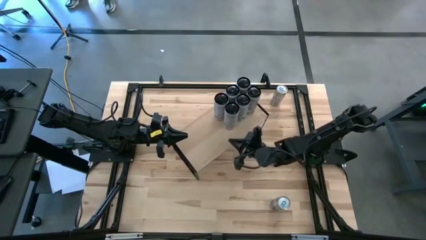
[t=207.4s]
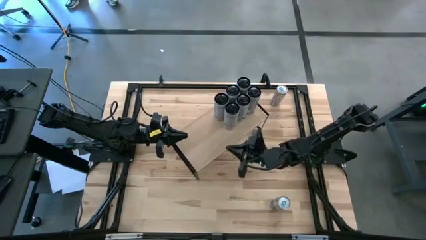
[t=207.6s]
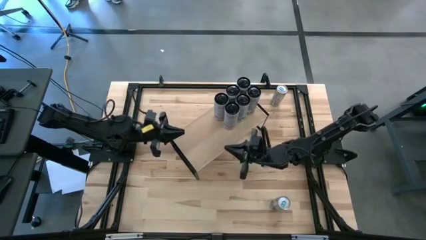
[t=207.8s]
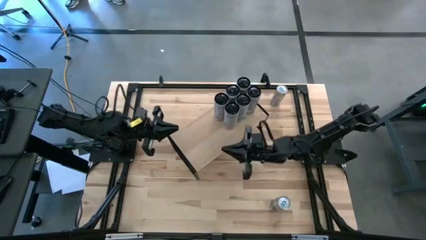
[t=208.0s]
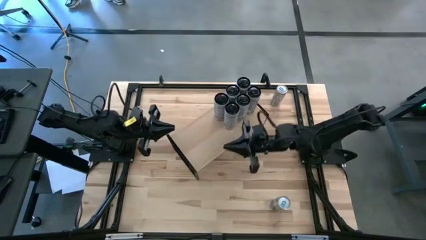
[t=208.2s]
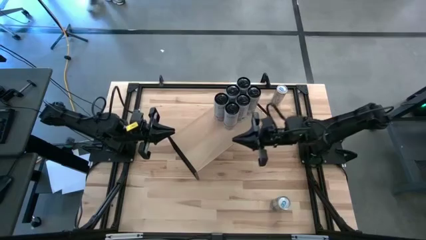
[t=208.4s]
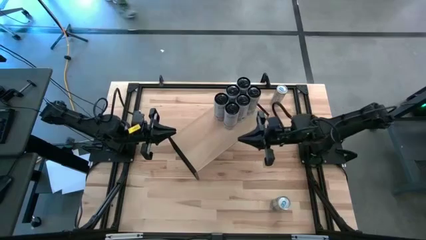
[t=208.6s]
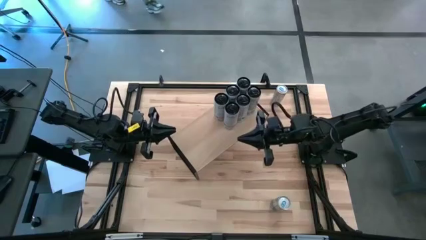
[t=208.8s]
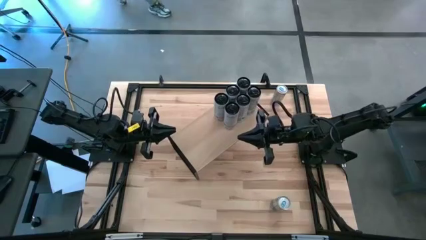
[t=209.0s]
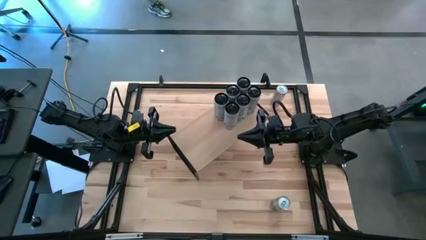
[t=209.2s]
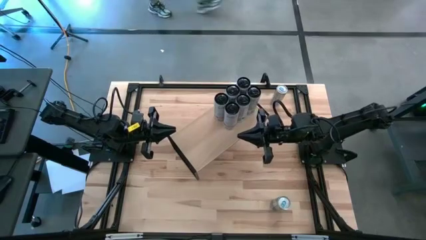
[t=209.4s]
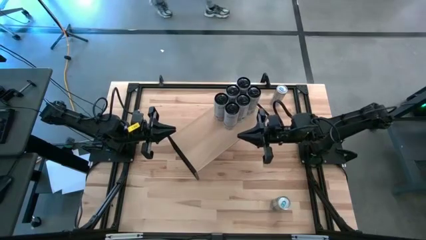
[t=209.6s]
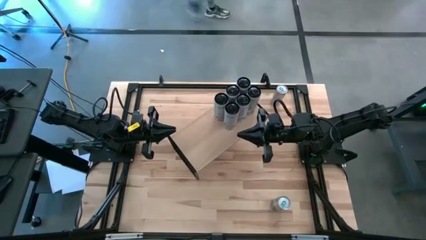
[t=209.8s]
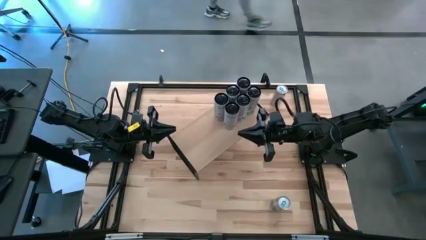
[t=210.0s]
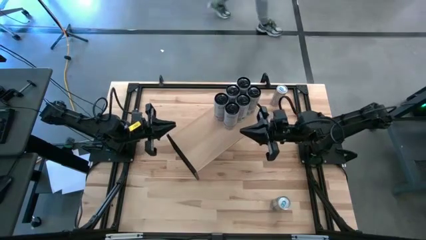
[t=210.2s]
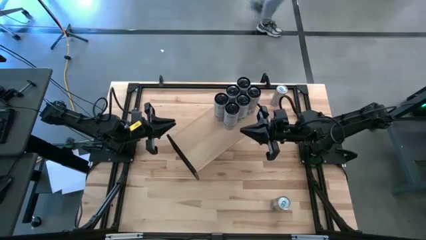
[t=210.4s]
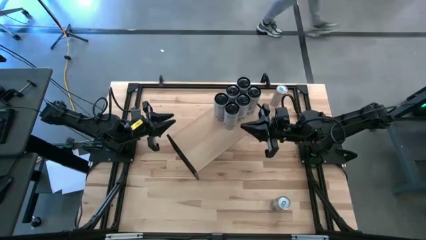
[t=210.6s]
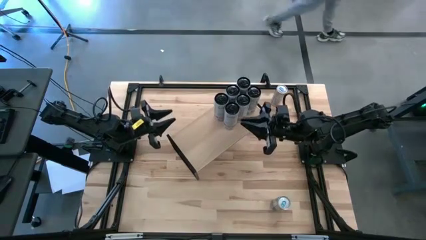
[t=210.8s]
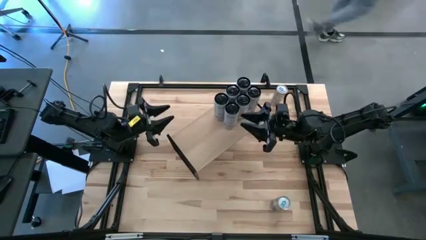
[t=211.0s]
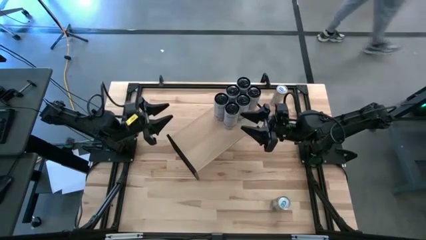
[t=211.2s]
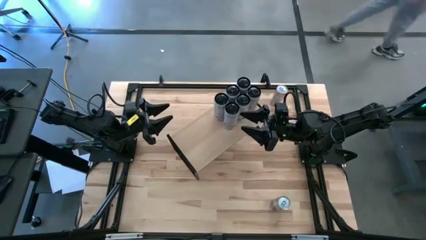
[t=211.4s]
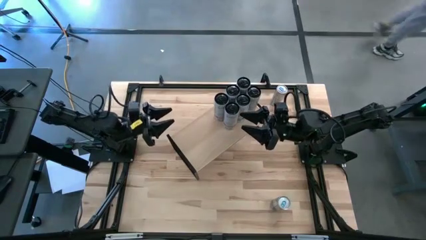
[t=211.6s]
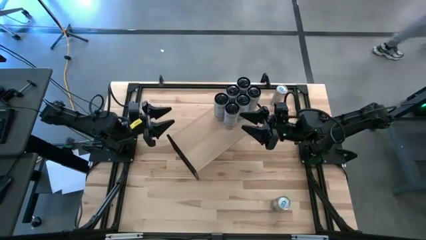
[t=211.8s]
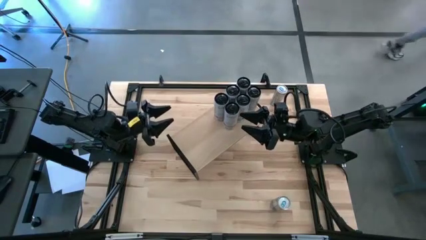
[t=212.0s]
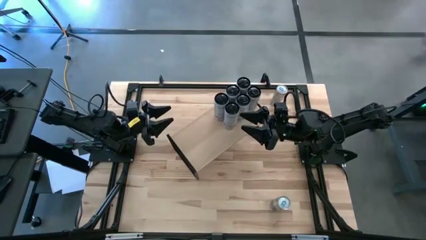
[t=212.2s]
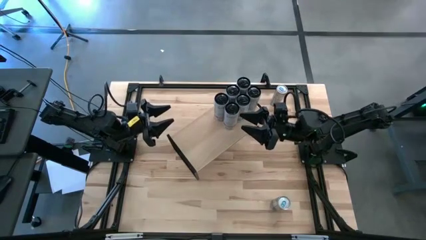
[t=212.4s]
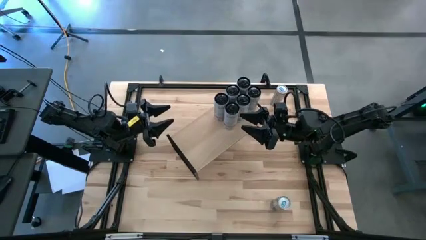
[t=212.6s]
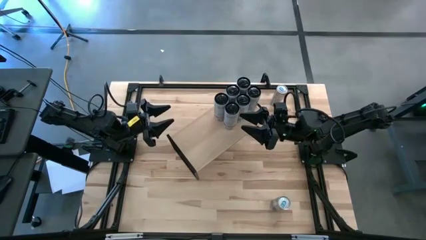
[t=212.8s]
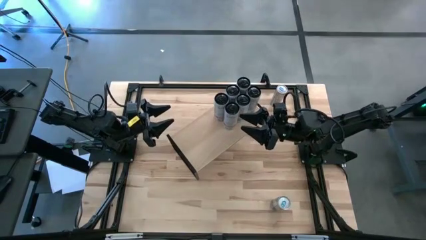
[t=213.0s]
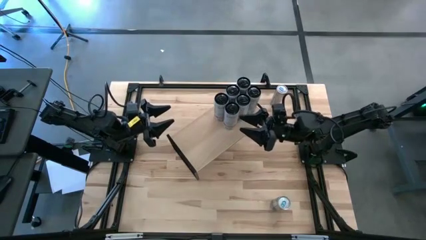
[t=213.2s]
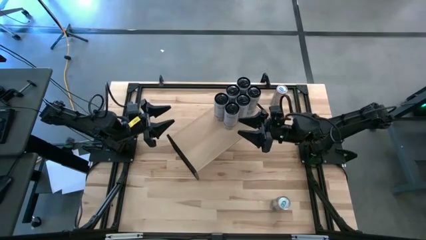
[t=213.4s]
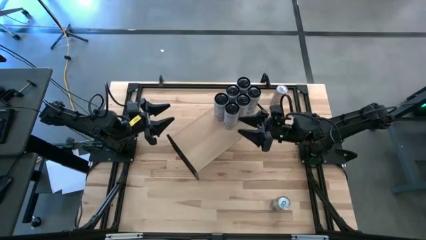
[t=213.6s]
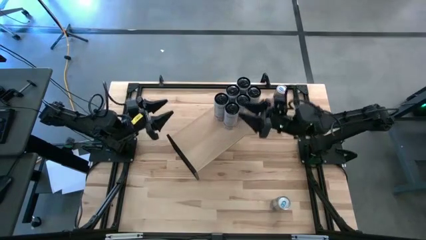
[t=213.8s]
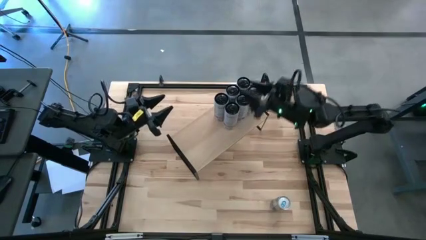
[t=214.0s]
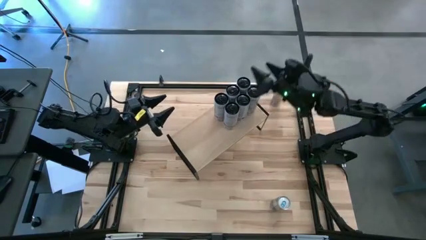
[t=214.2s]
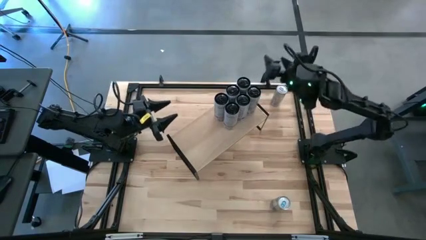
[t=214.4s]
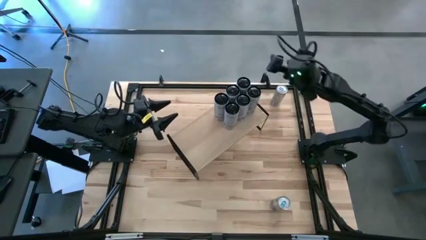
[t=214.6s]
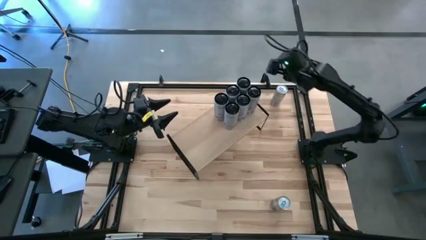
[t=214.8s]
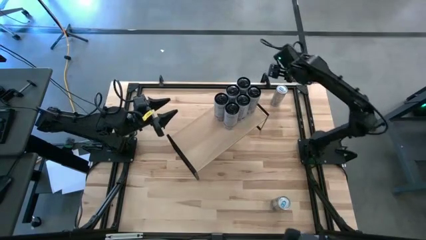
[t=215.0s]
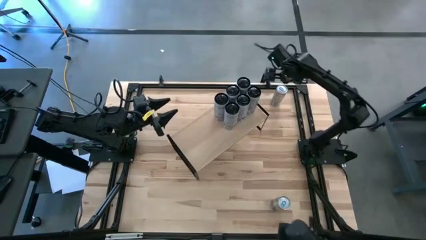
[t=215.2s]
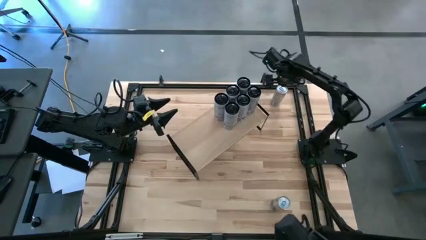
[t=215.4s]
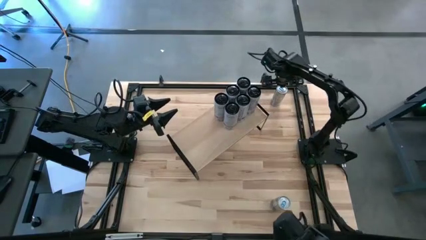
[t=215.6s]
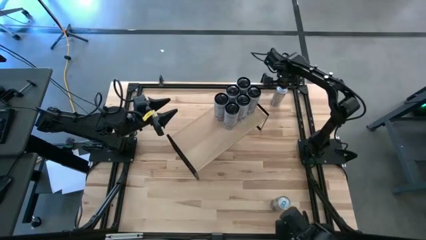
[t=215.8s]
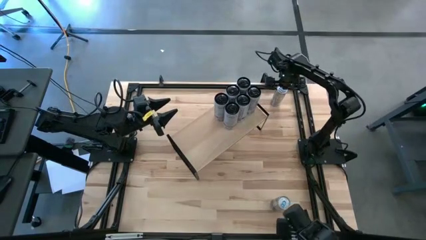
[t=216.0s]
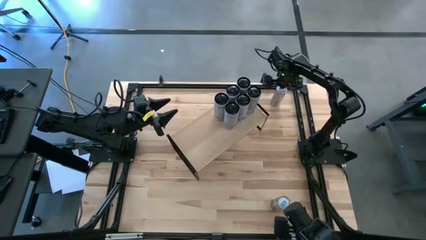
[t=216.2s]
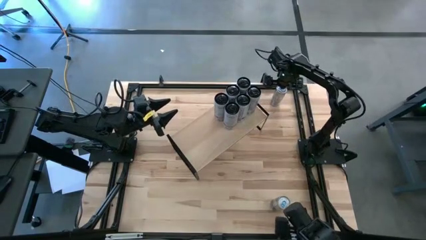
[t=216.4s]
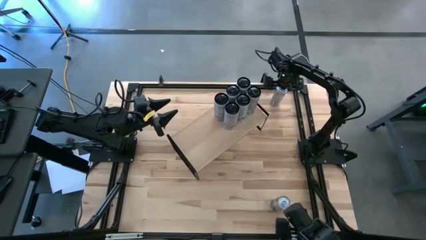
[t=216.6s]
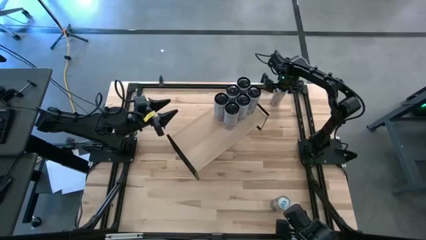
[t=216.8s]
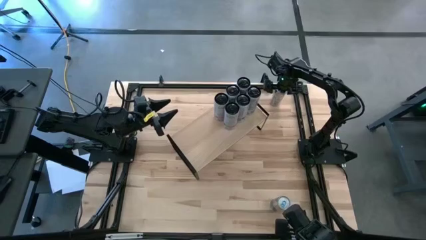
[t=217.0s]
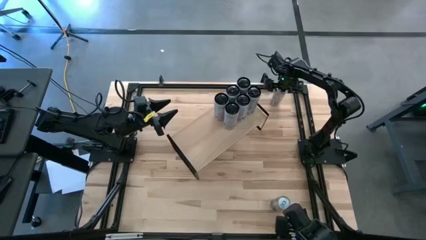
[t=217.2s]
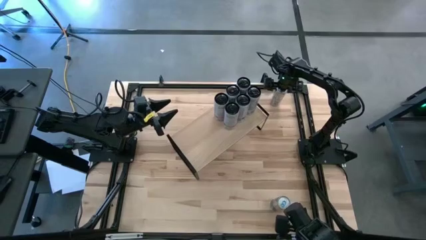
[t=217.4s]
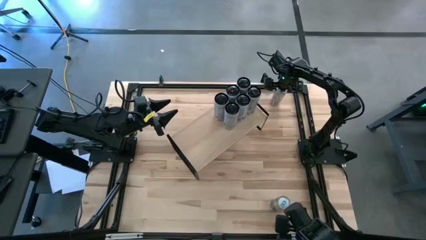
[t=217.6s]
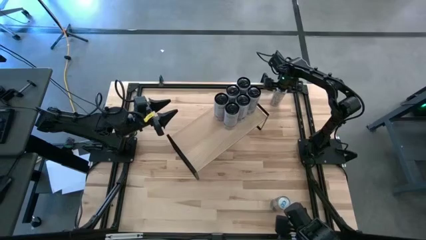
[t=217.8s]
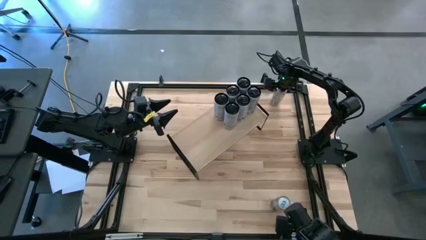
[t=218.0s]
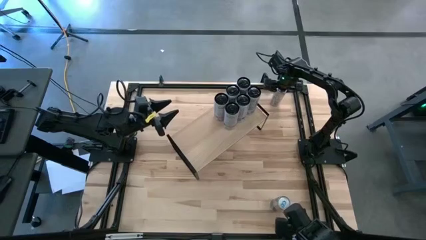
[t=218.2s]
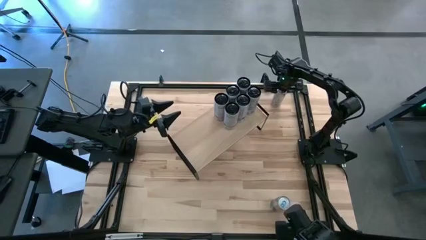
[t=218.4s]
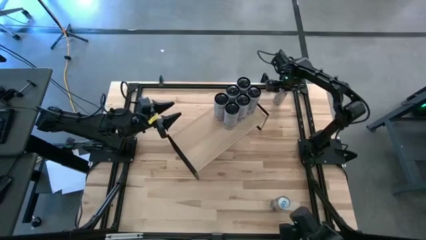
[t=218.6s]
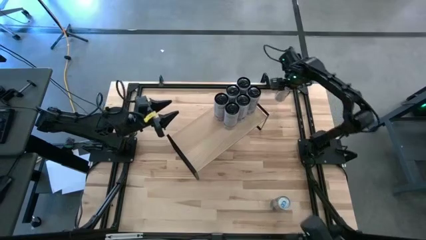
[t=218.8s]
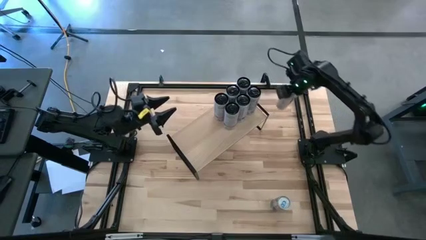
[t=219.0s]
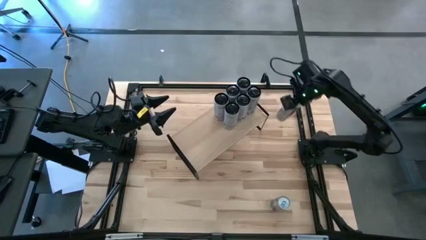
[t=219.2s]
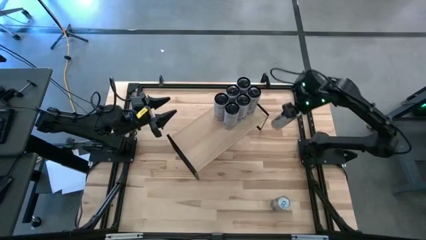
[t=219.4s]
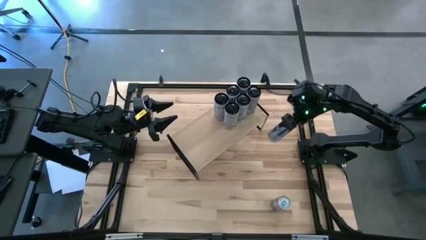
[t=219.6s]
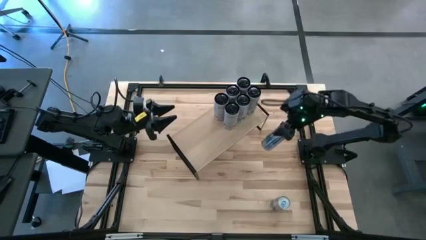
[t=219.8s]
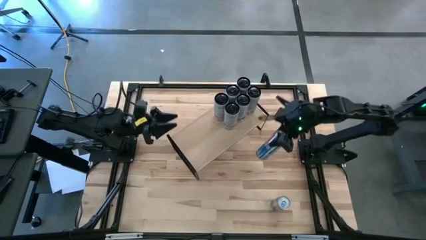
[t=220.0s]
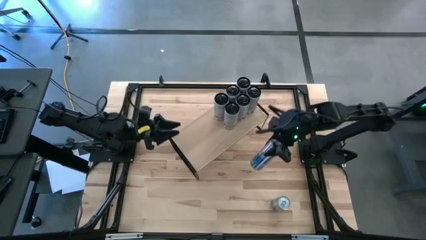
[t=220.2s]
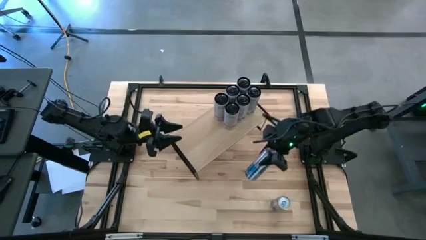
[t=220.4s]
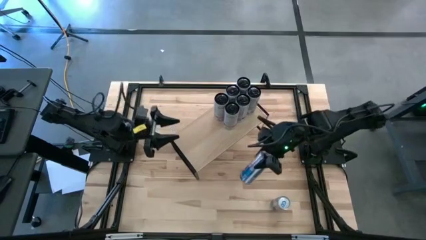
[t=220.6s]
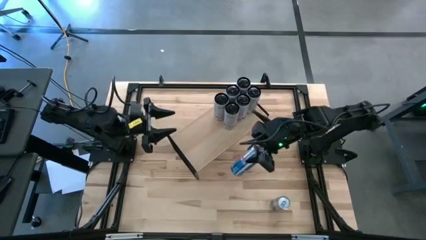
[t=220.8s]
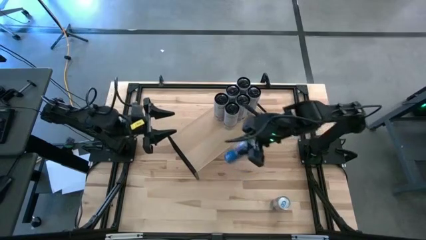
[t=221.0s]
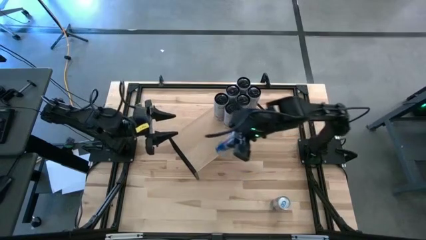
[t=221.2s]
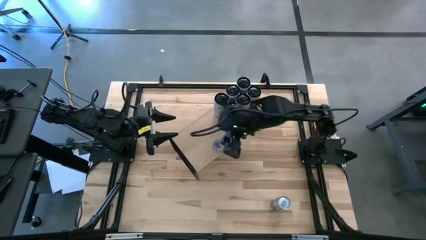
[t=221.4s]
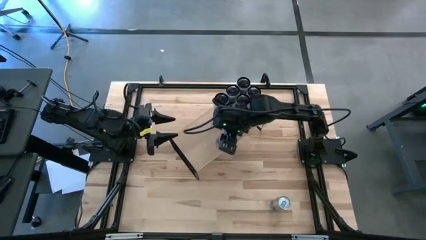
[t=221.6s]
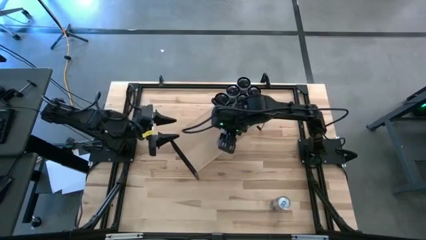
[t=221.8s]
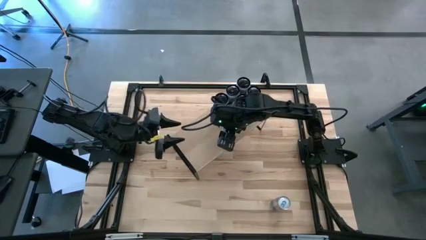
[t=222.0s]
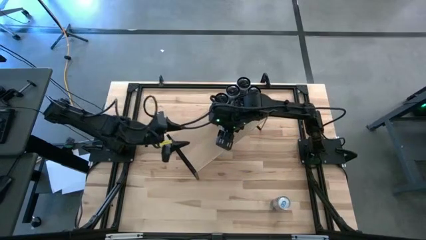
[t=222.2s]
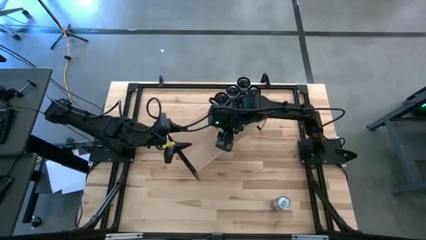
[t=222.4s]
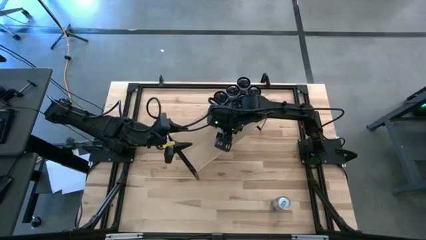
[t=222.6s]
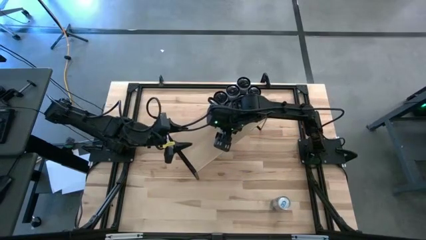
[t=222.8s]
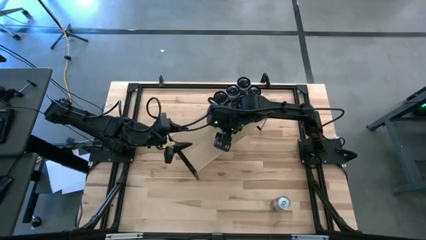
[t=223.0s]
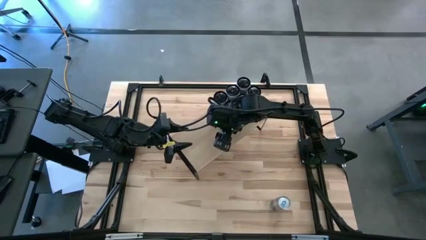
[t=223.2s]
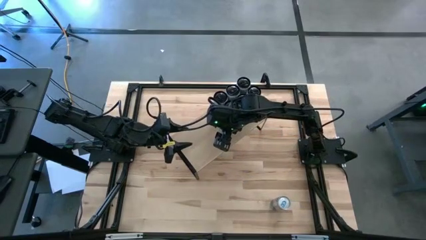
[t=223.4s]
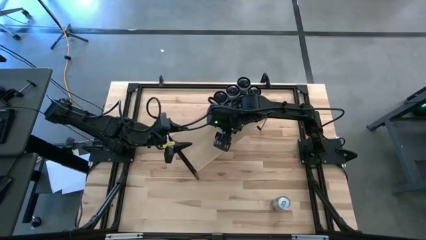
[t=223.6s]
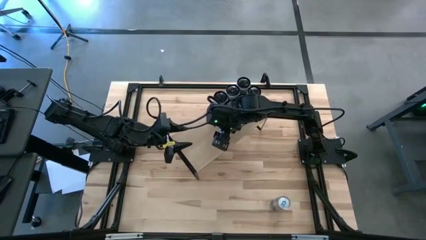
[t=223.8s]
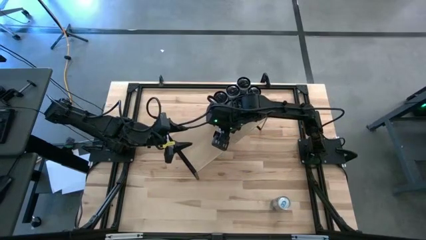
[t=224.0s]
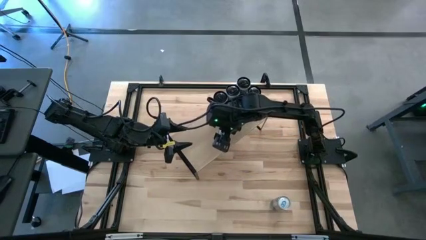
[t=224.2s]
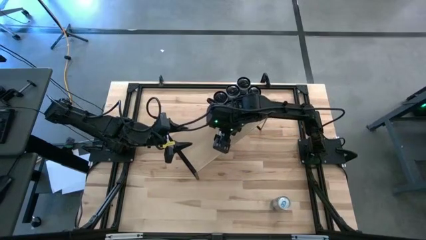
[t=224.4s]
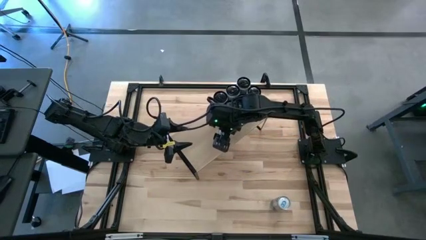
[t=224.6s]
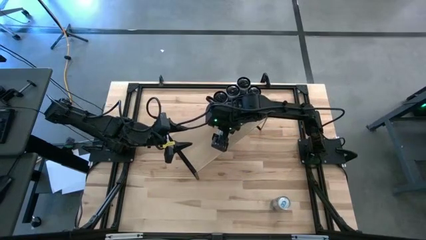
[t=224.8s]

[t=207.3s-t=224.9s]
Task: Place canned beverage on shelf
Put the top blue soda can on the shelf
